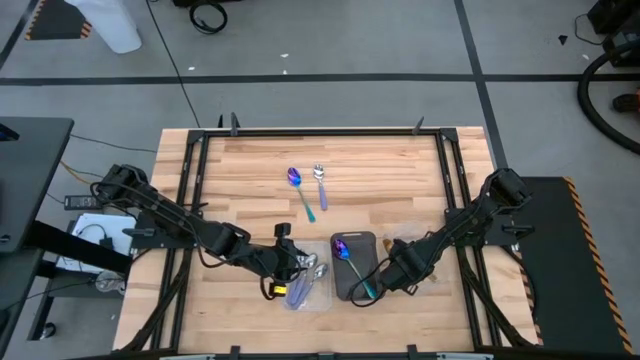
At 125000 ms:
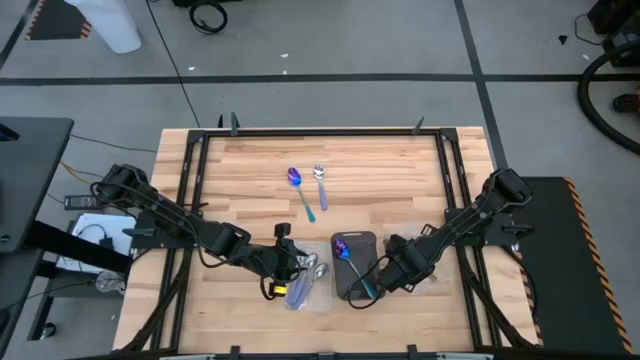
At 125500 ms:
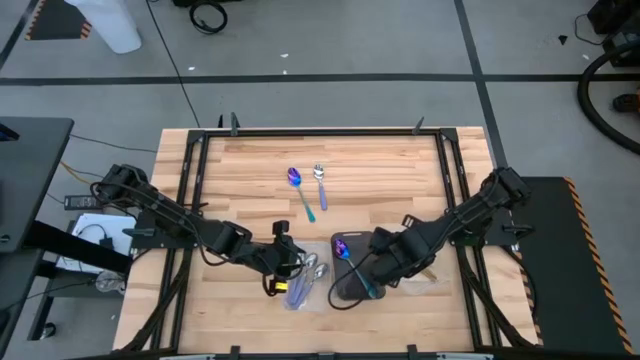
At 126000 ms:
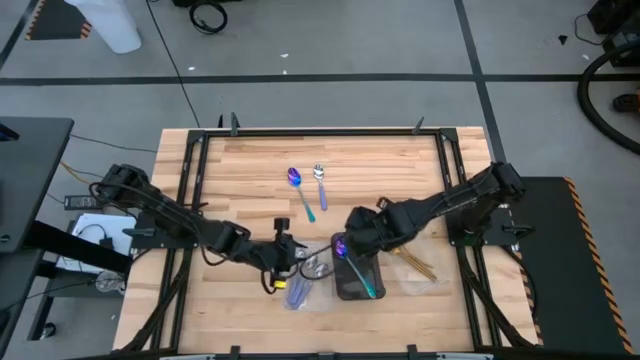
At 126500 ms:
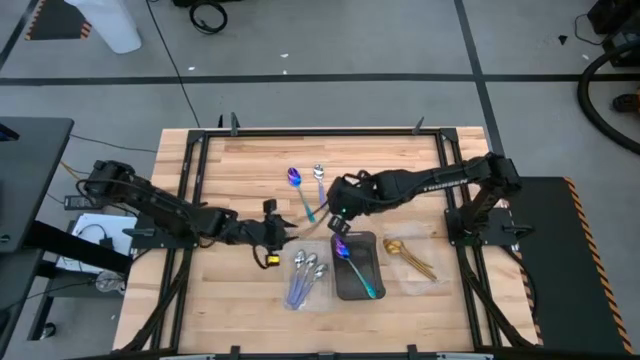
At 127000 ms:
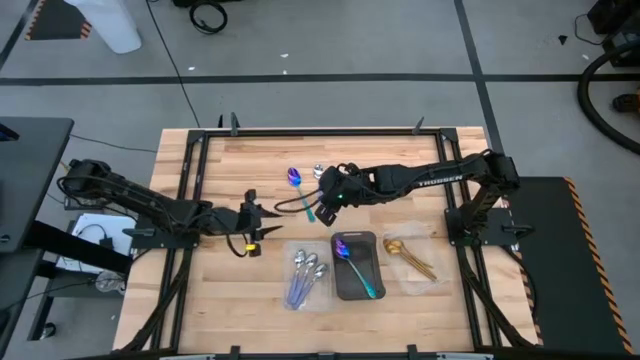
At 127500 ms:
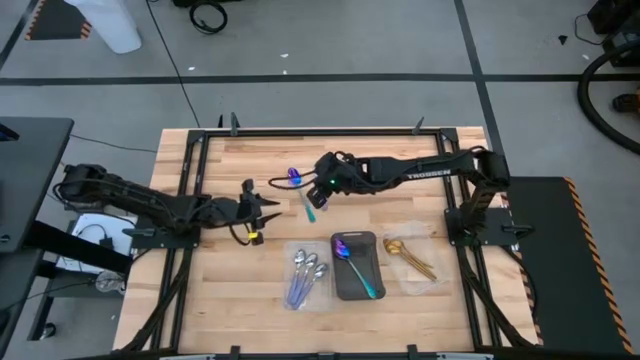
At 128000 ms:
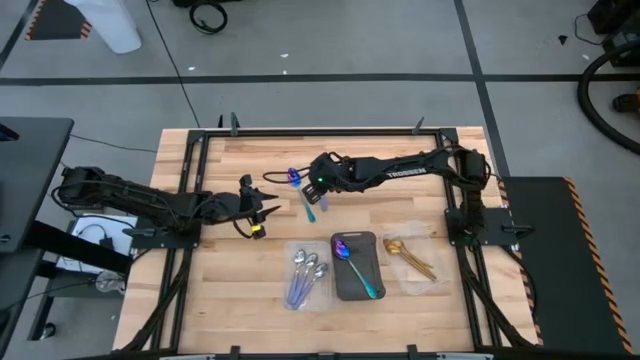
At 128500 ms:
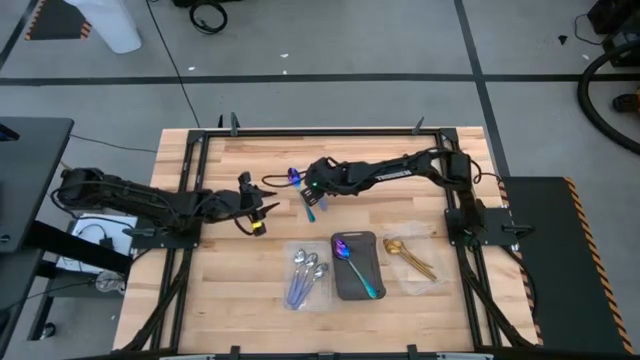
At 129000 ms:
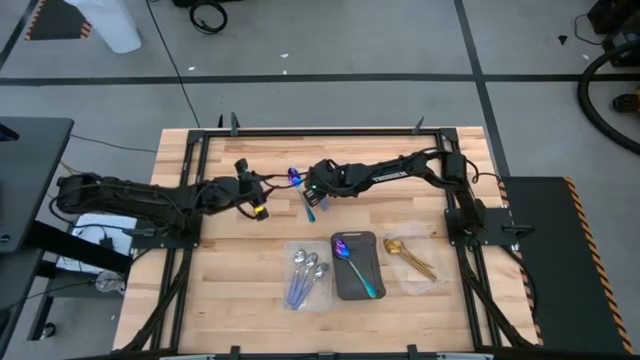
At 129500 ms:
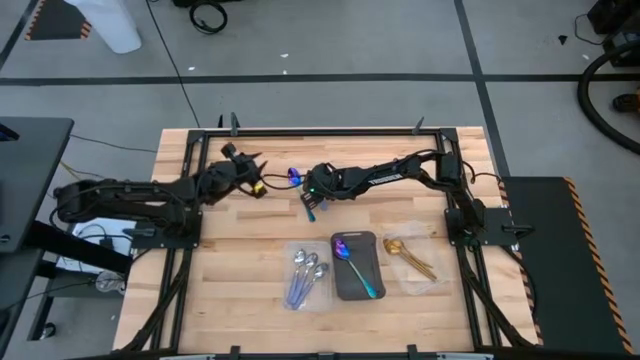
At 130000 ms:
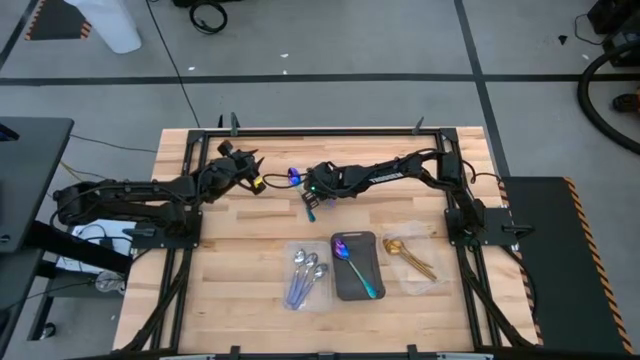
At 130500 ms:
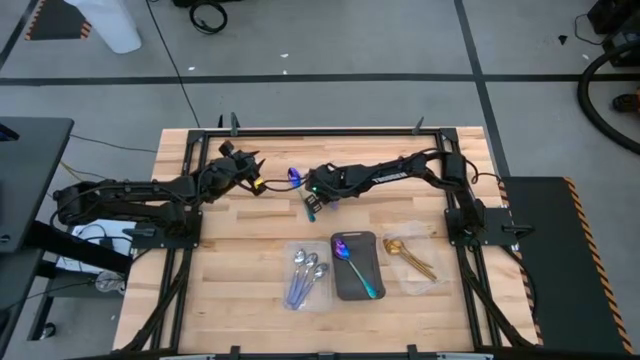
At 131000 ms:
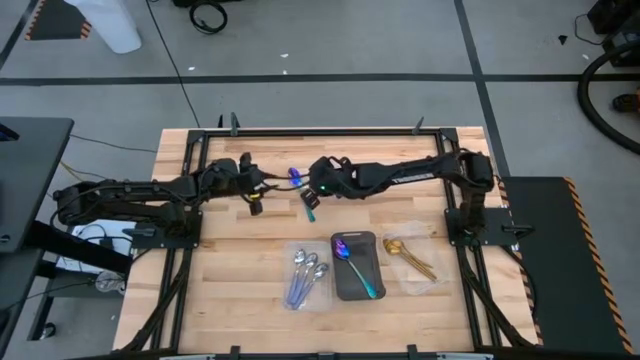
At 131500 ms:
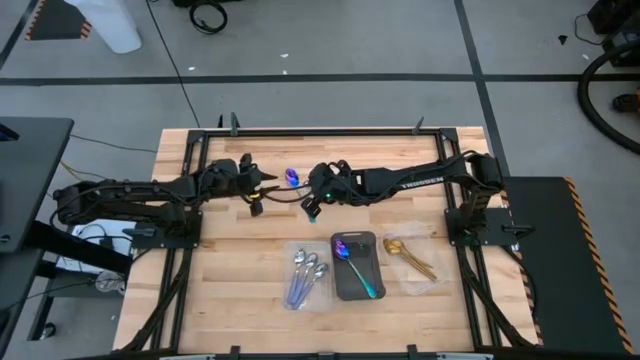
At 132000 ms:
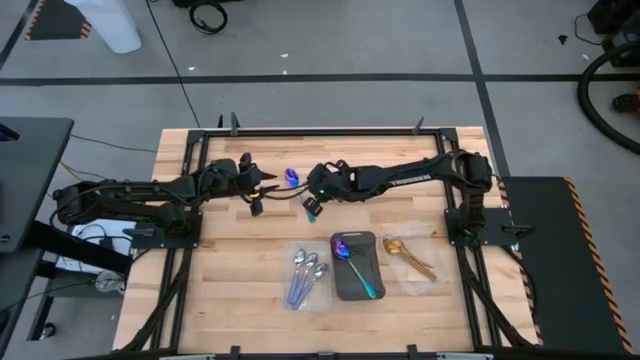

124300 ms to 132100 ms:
Task: Sort silverware by color (type)
Put the purple spoon into the left transparent bin

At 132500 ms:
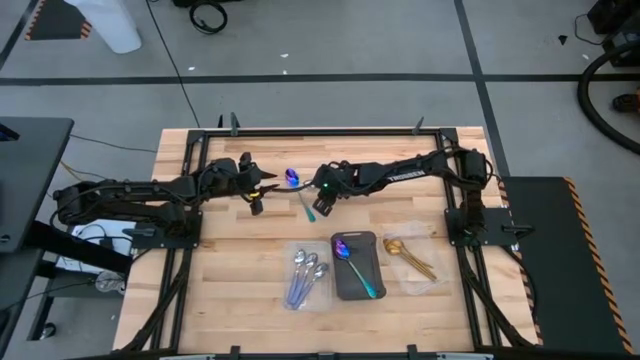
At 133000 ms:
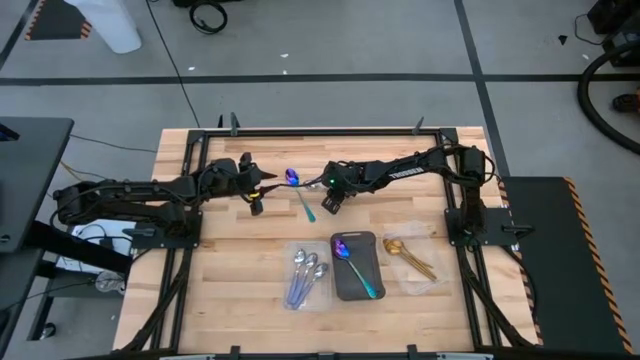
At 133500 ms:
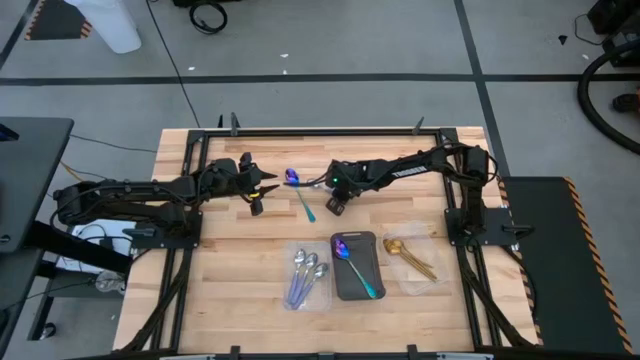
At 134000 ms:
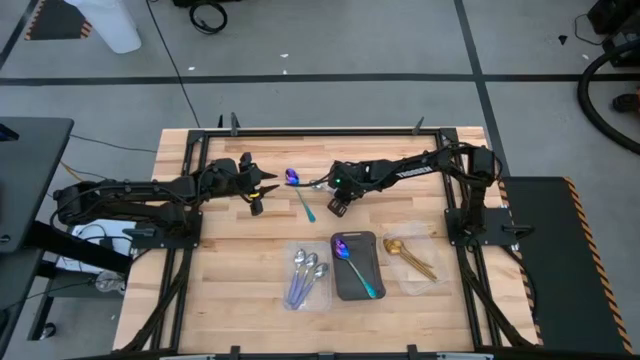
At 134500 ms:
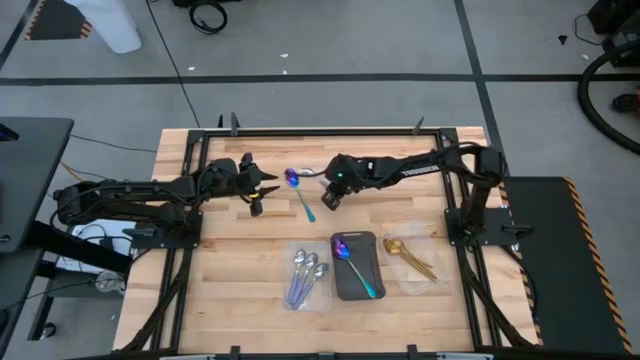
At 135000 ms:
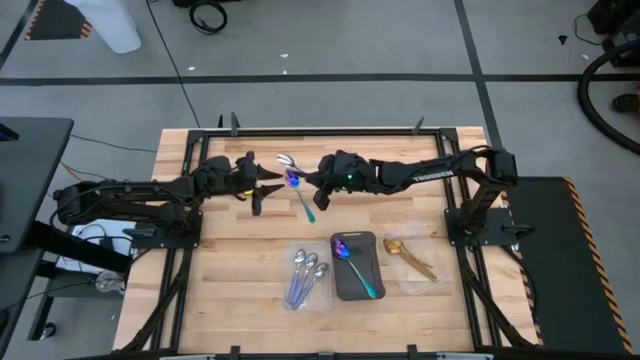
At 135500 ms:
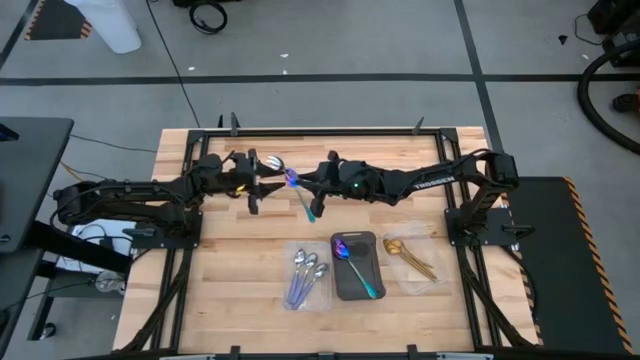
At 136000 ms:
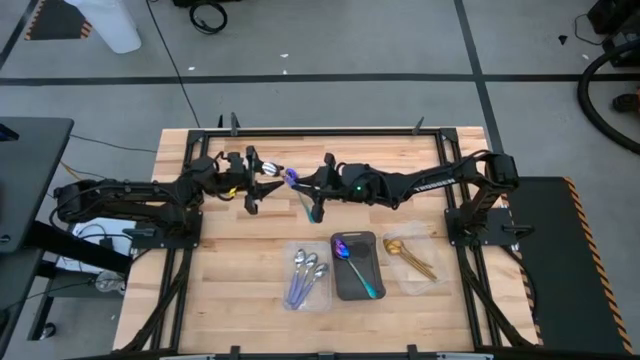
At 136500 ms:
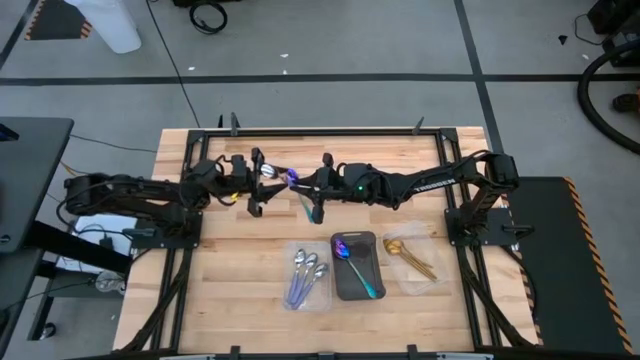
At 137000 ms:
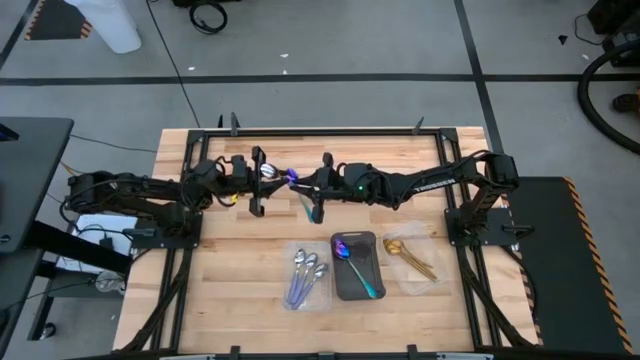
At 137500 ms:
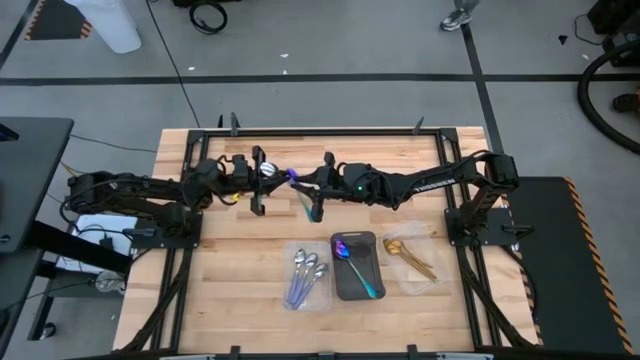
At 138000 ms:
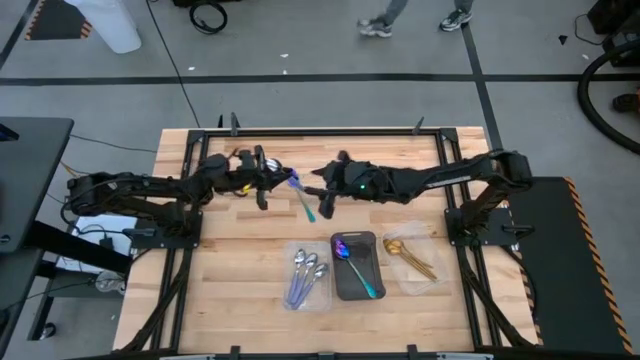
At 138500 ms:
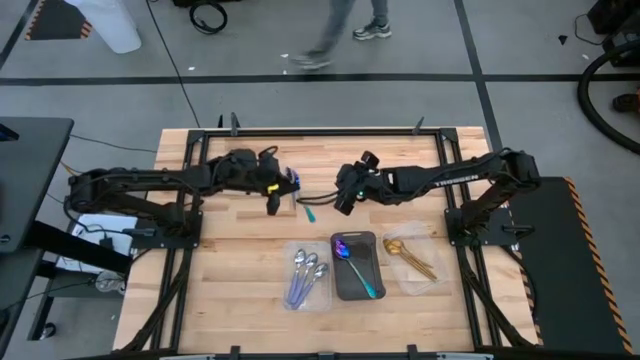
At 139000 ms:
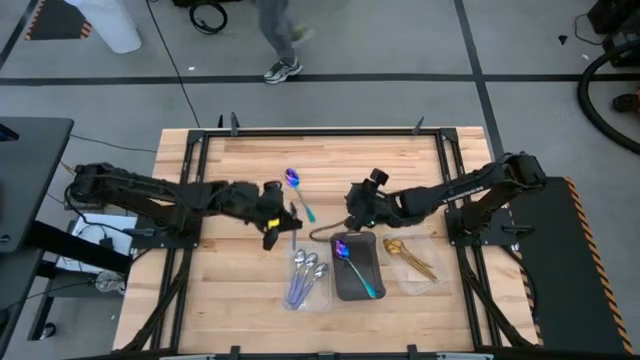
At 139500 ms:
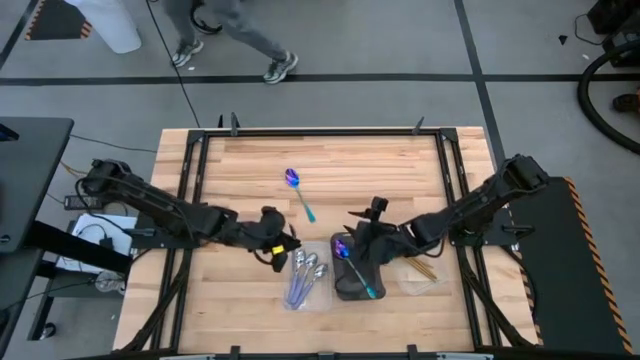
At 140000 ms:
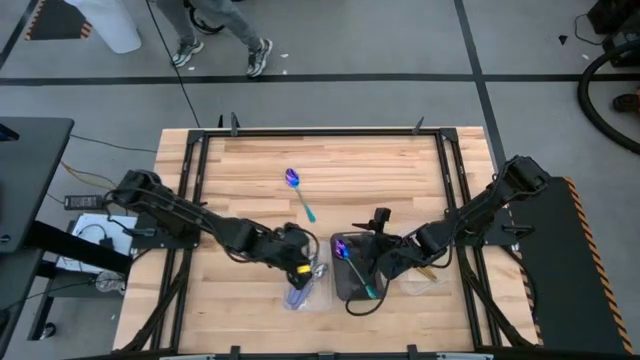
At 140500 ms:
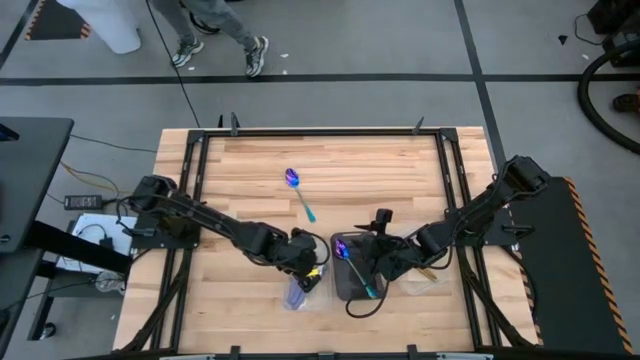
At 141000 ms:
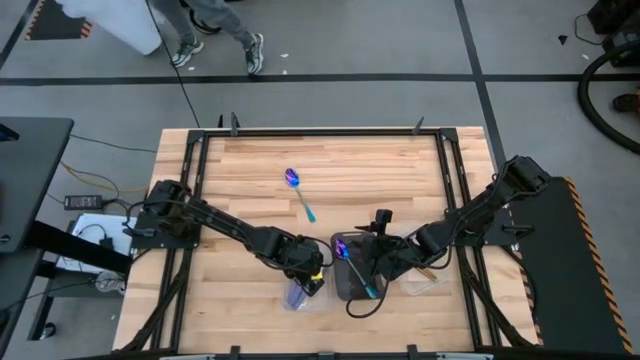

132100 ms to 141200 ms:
Put the purple spoon into the left transparent bin

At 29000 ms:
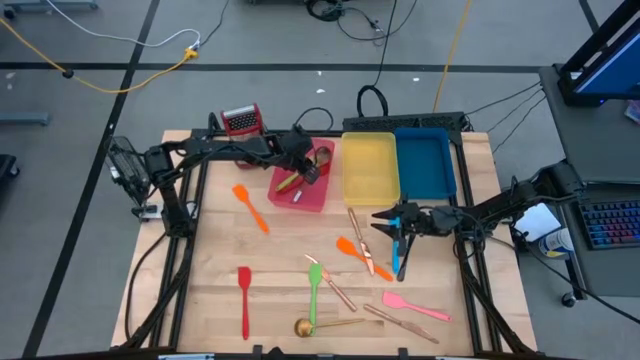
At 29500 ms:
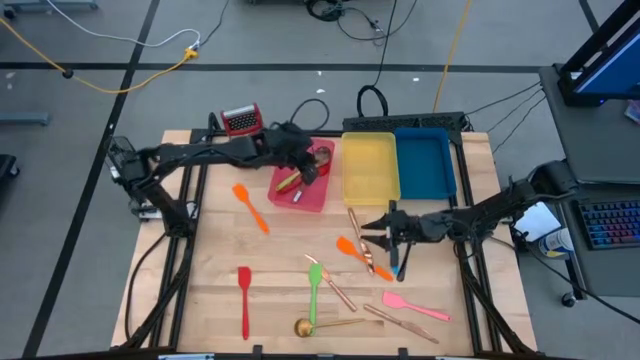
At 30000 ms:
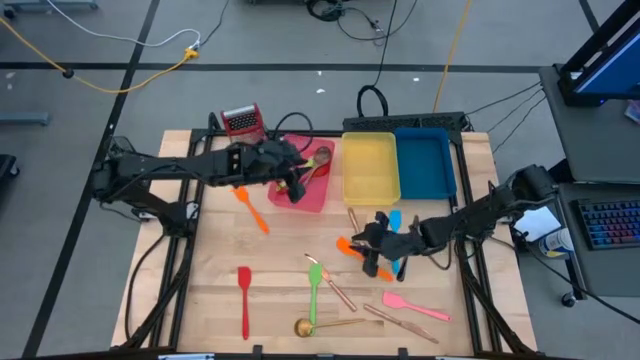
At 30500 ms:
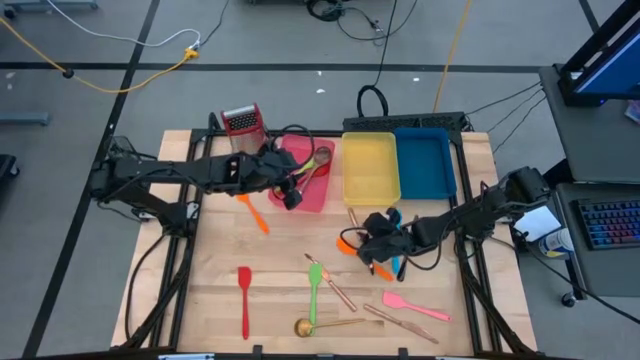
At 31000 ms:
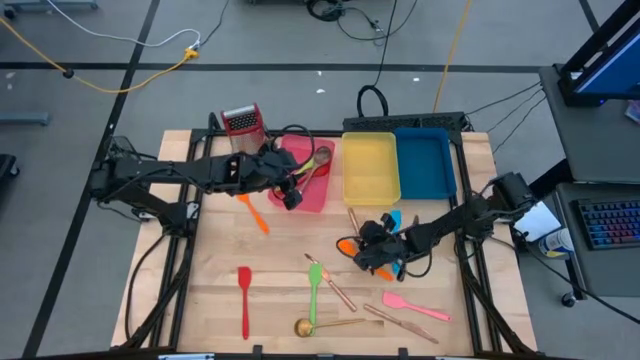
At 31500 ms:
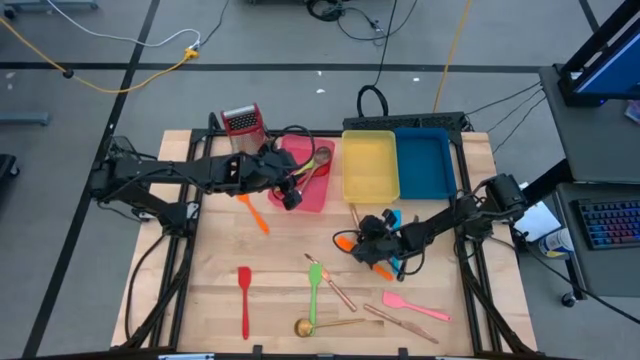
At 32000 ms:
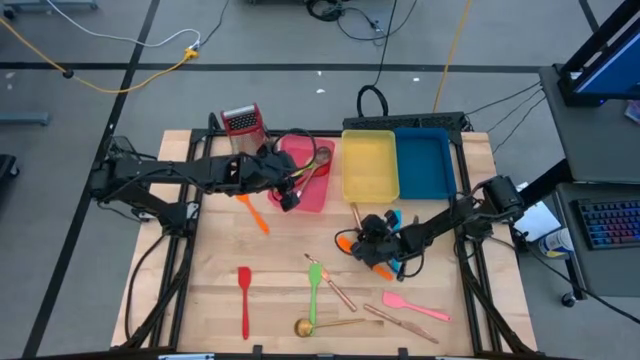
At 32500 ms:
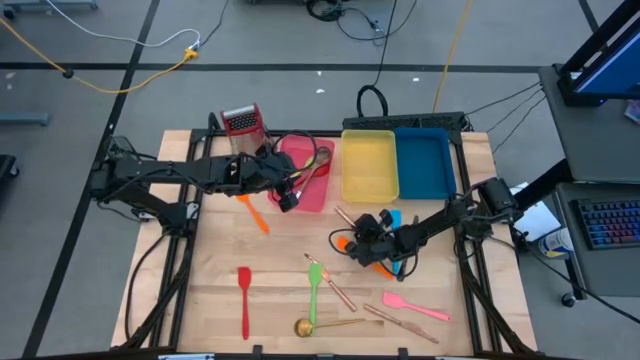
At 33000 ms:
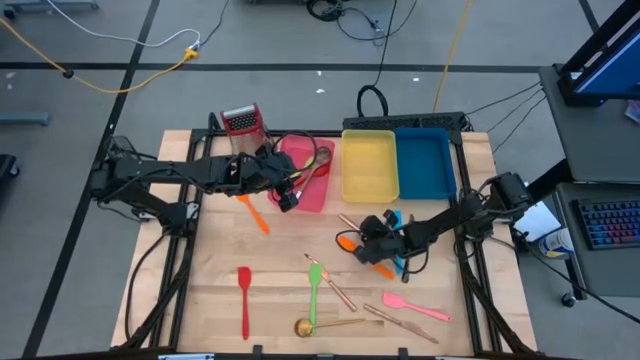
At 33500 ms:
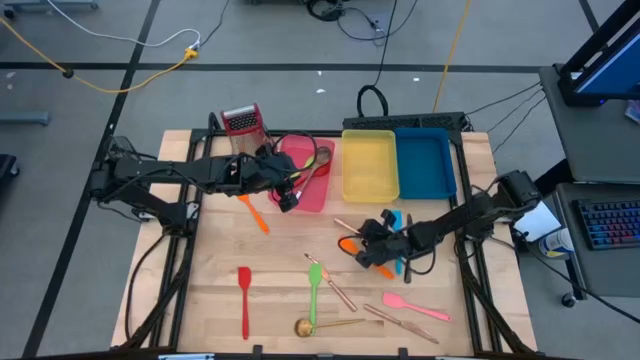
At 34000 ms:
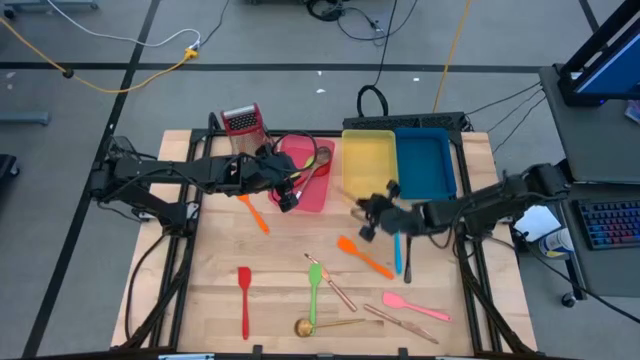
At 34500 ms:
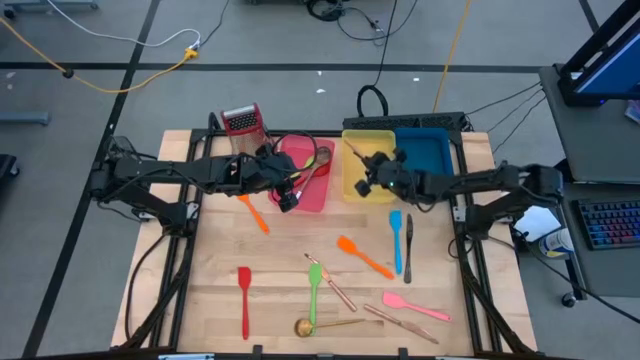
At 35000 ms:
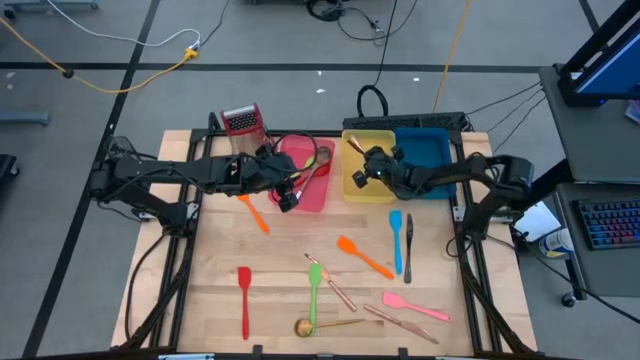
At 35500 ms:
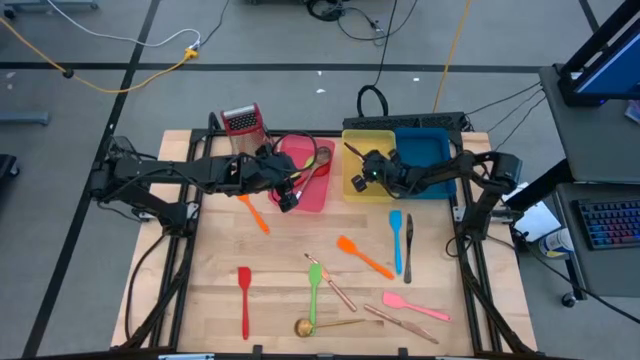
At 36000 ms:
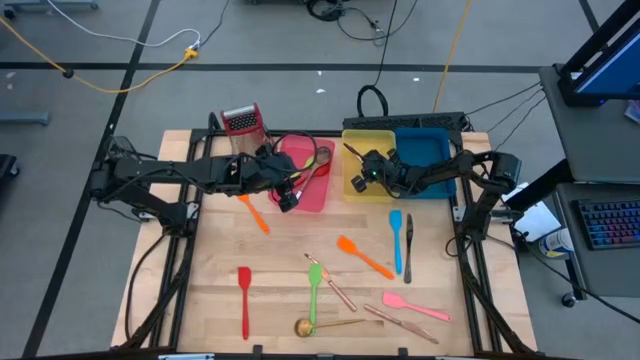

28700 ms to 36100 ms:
Task: Pick & Place Kitchen Items
Put the top gold table knife into the yellow bin
